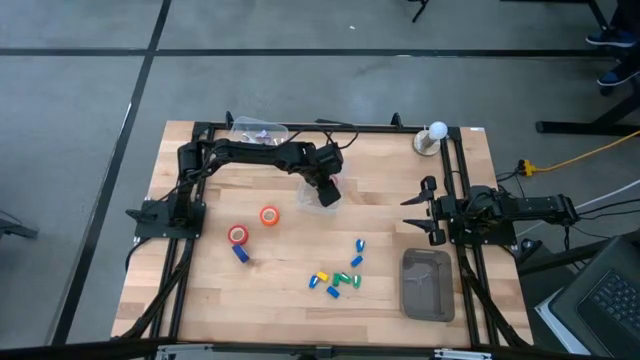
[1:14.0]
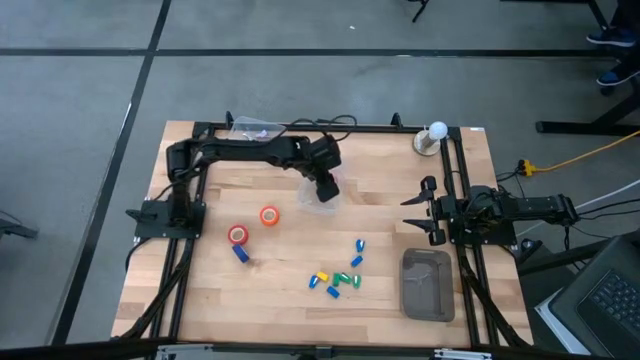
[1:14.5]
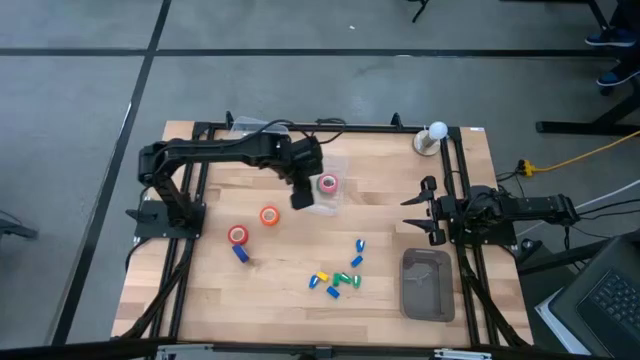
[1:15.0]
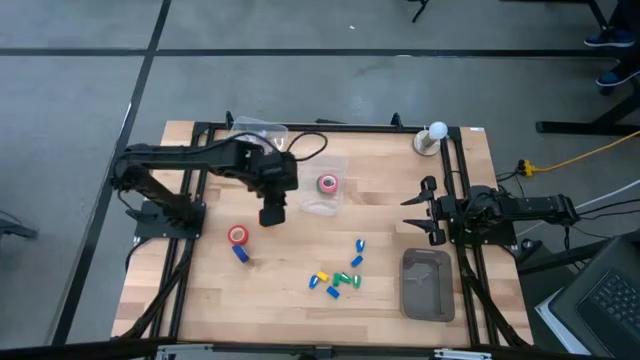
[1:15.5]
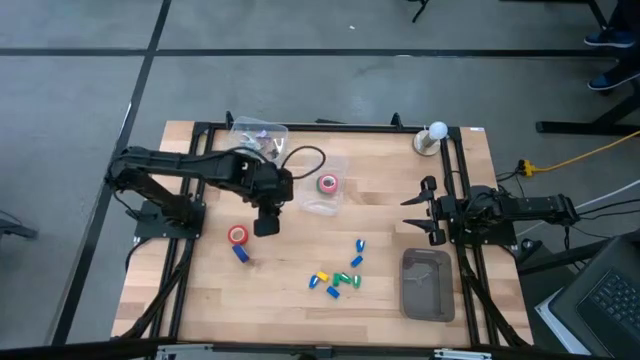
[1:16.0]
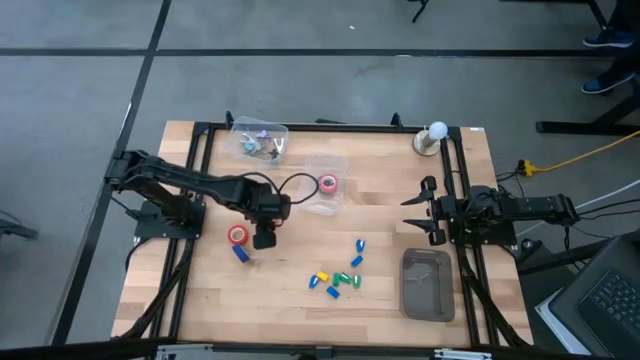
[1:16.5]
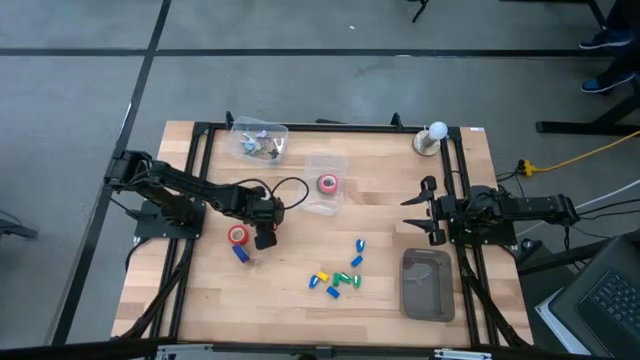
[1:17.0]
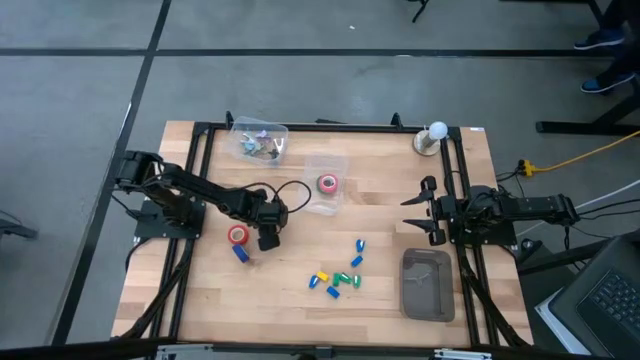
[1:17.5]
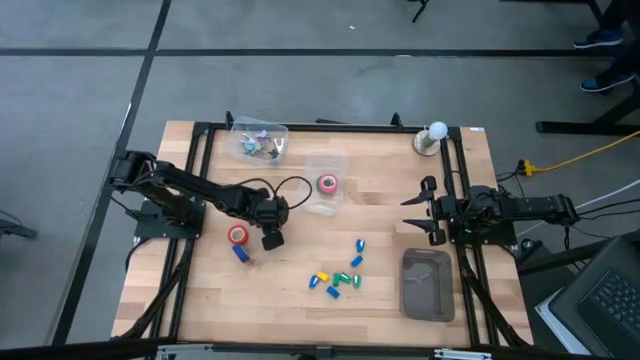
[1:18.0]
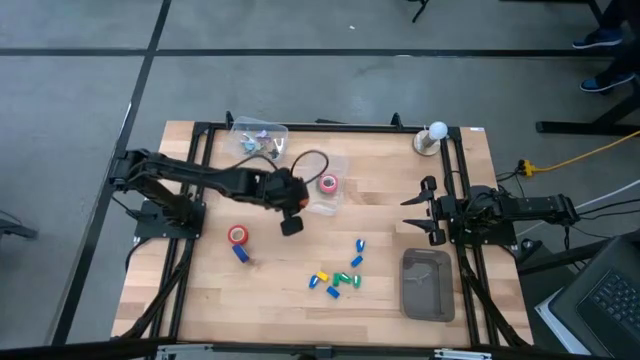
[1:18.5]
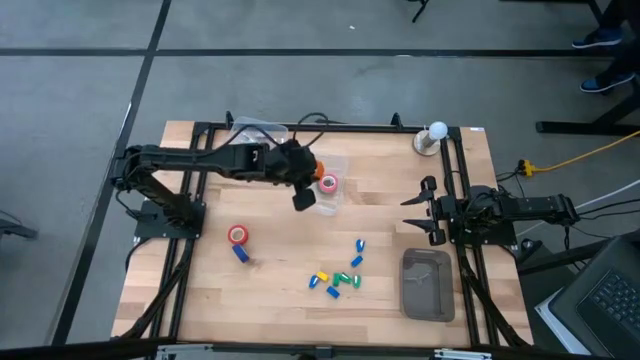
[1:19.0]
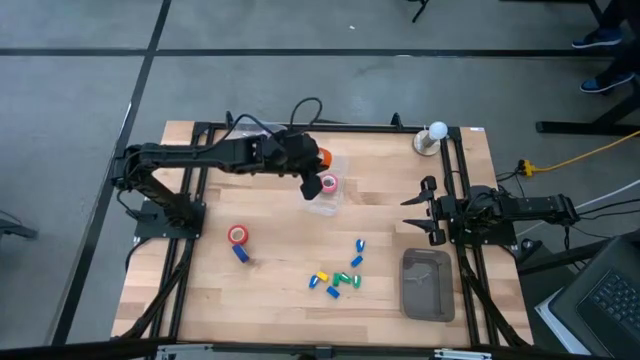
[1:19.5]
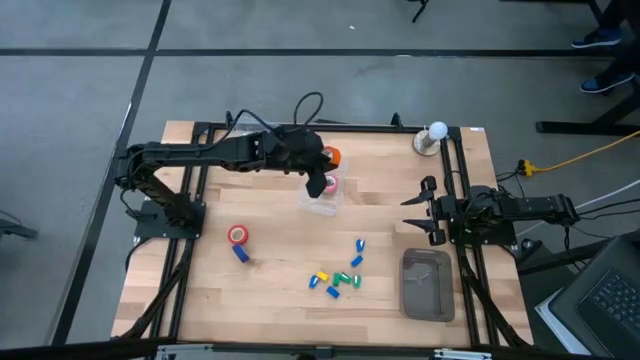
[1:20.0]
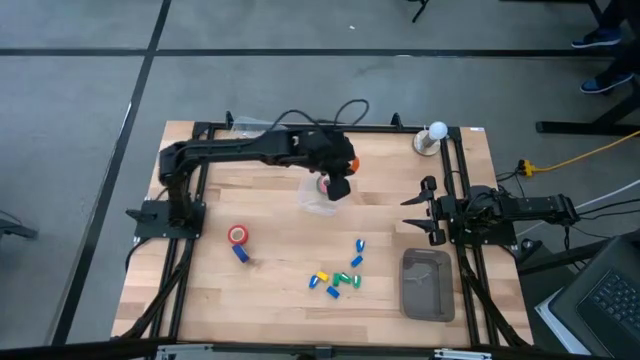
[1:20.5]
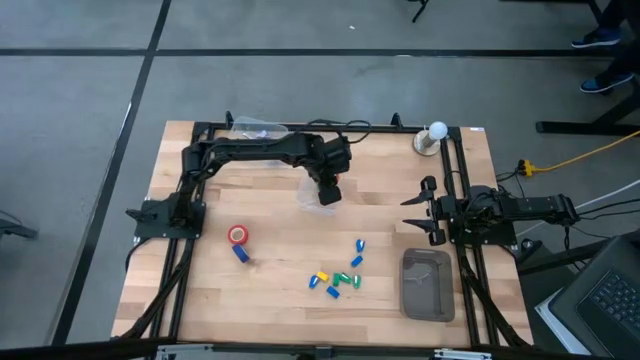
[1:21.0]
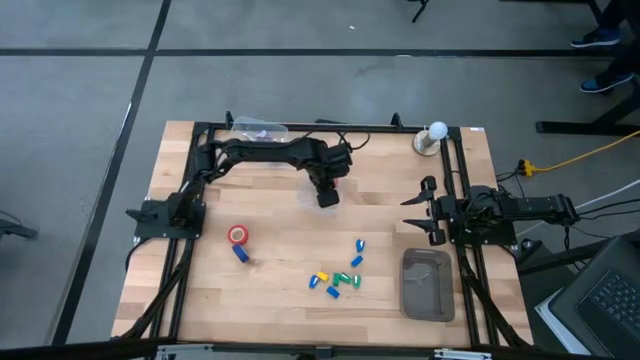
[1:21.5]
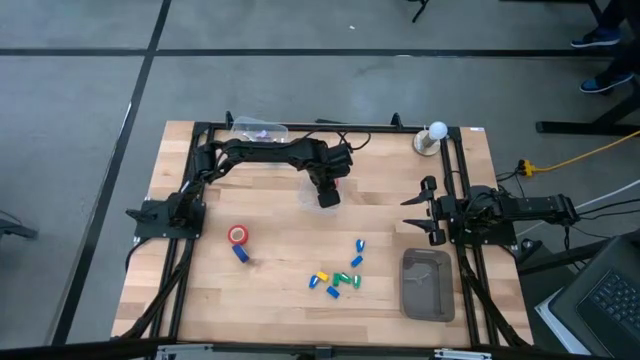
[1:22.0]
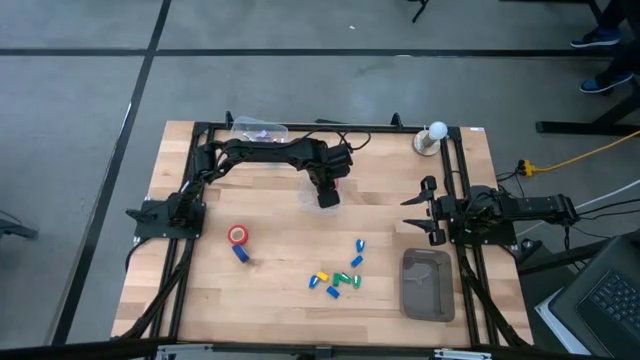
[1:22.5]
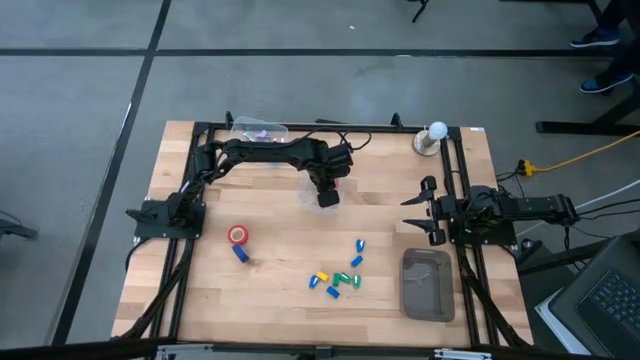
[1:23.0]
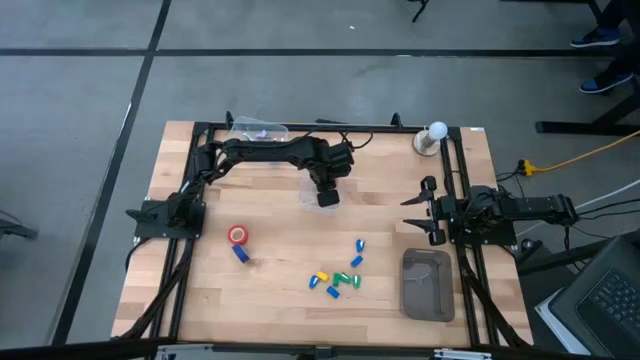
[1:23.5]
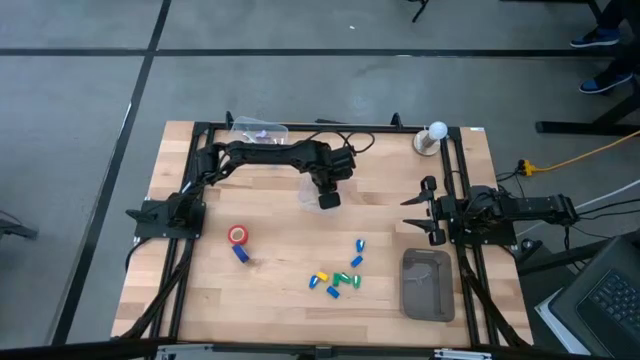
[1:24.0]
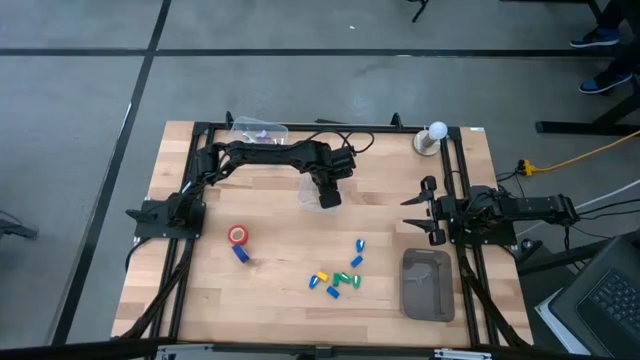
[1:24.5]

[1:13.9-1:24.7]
Task: Pick and place Stapler, Stapler remover, tape
Put the orange tape into the bottom transparent bin

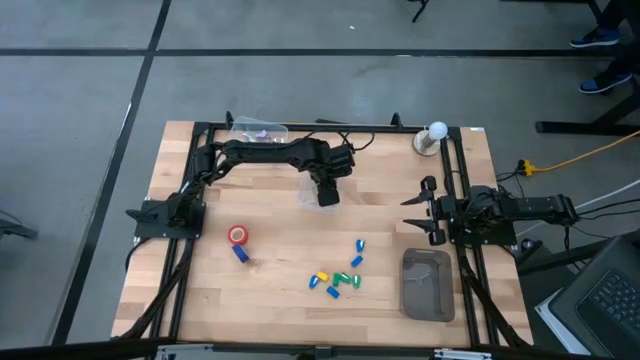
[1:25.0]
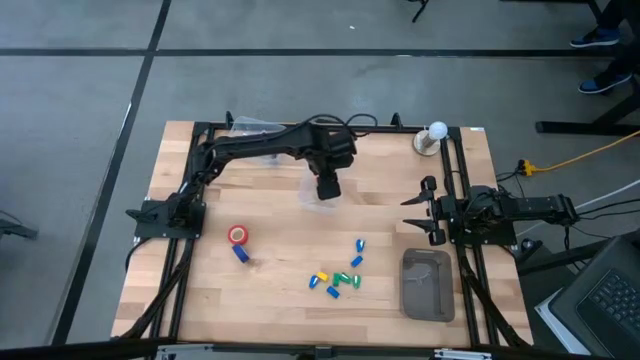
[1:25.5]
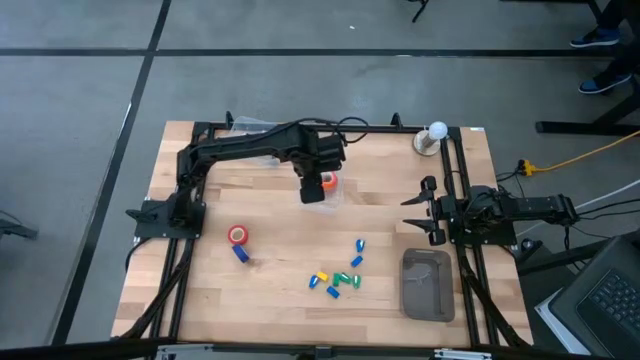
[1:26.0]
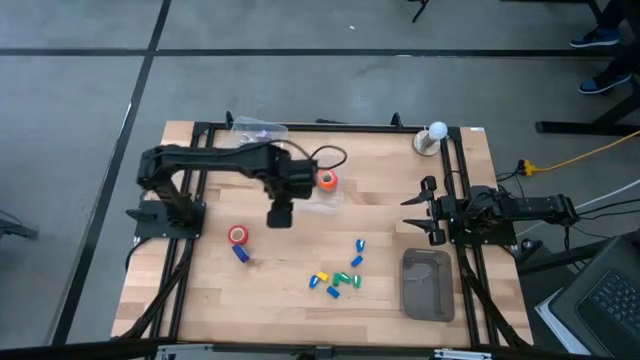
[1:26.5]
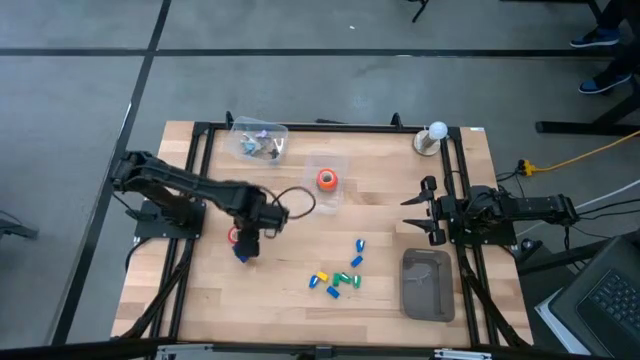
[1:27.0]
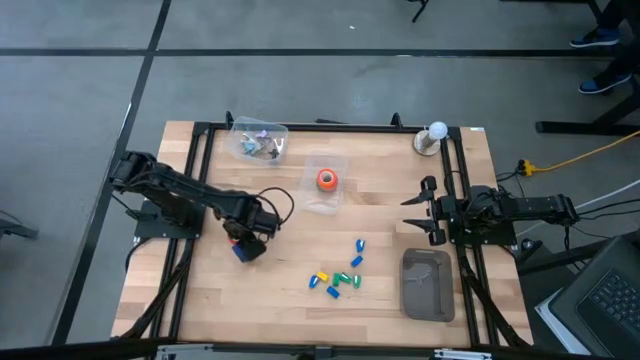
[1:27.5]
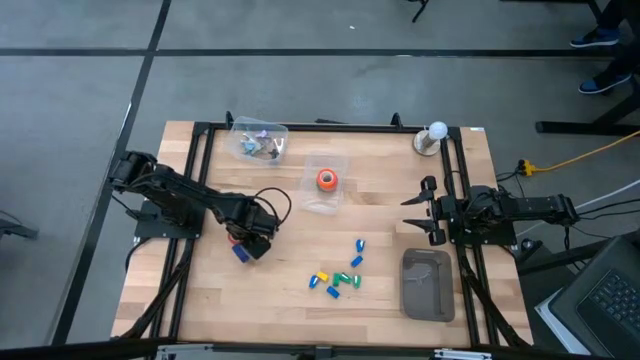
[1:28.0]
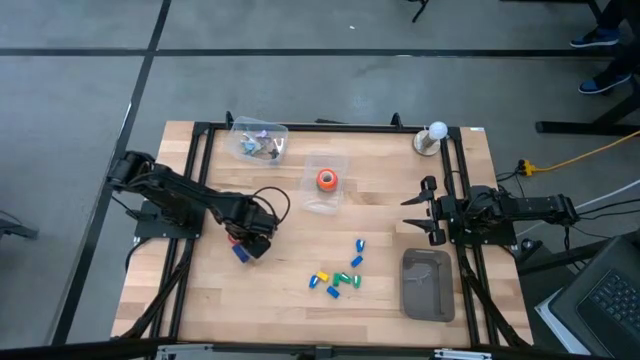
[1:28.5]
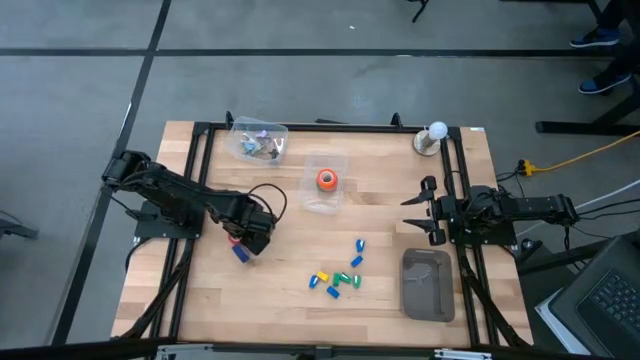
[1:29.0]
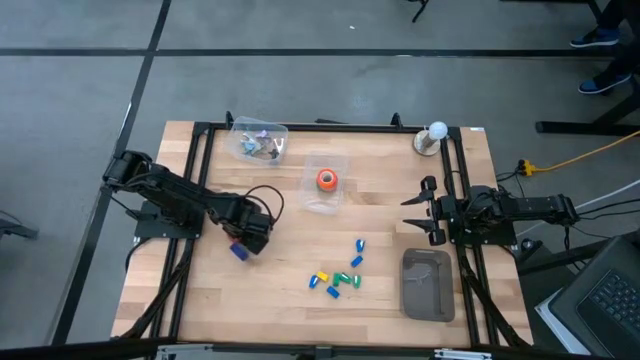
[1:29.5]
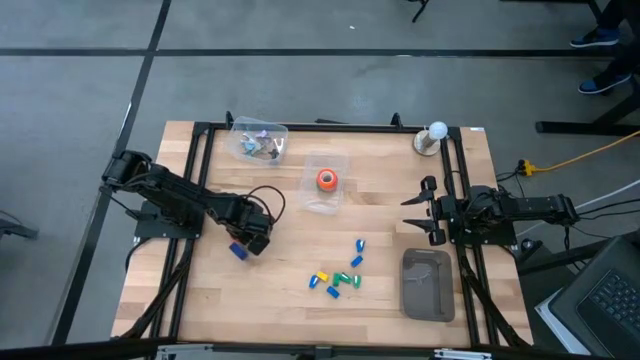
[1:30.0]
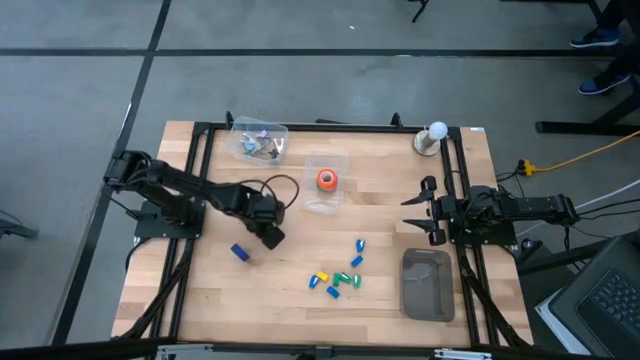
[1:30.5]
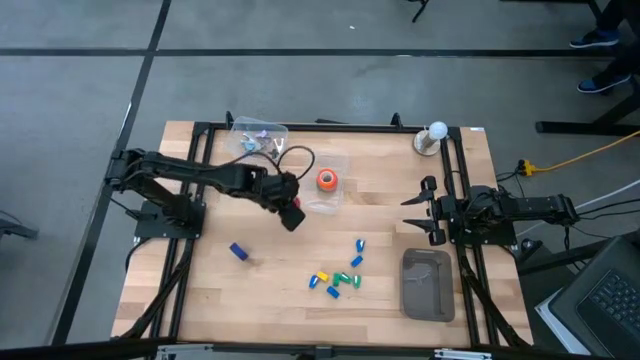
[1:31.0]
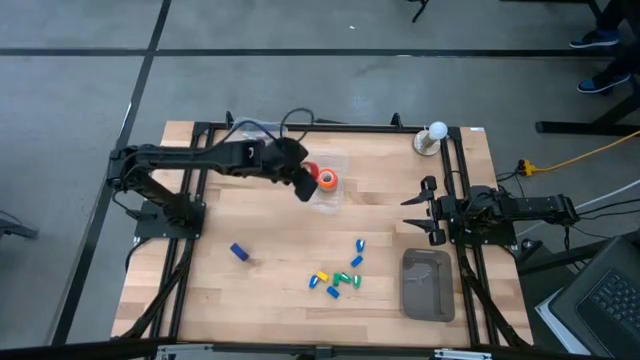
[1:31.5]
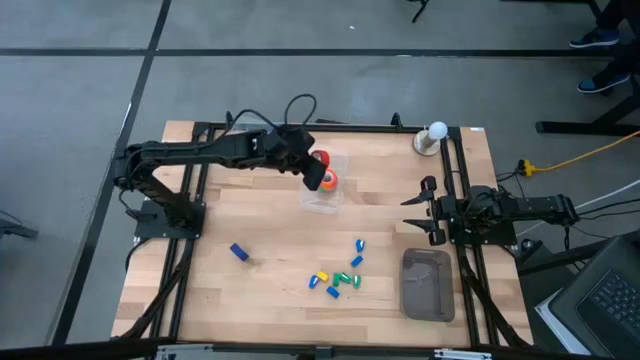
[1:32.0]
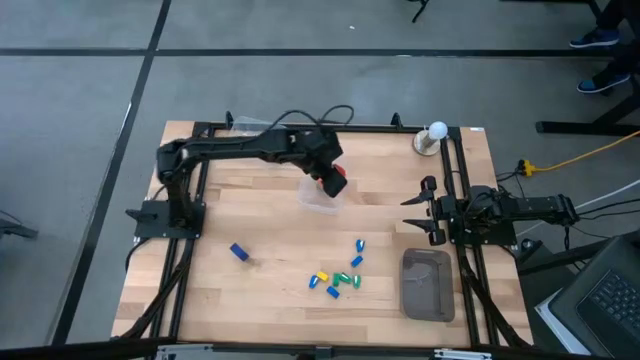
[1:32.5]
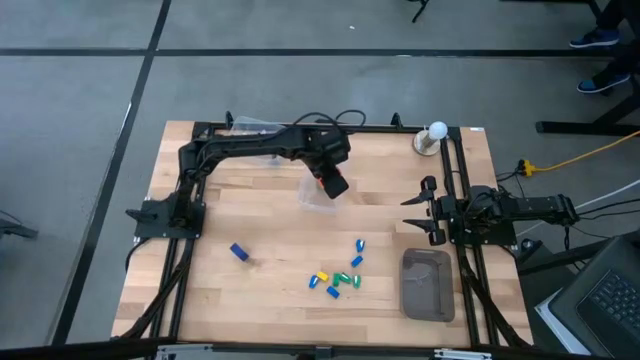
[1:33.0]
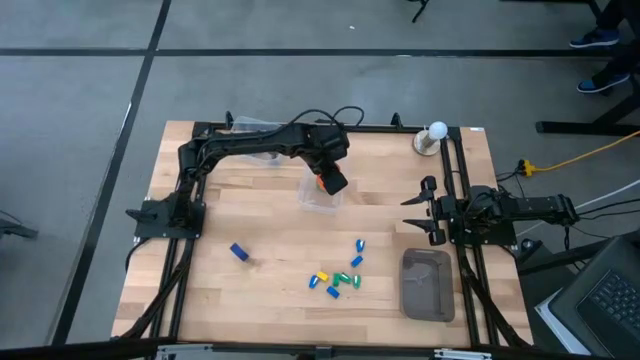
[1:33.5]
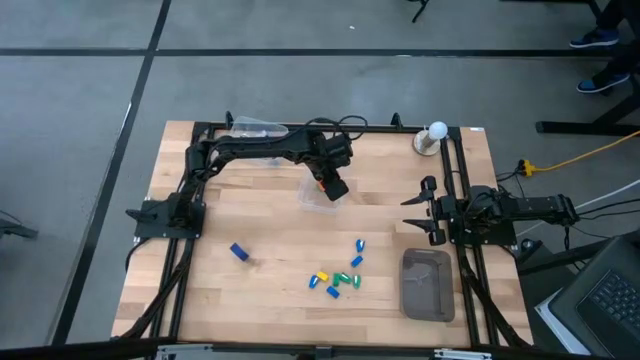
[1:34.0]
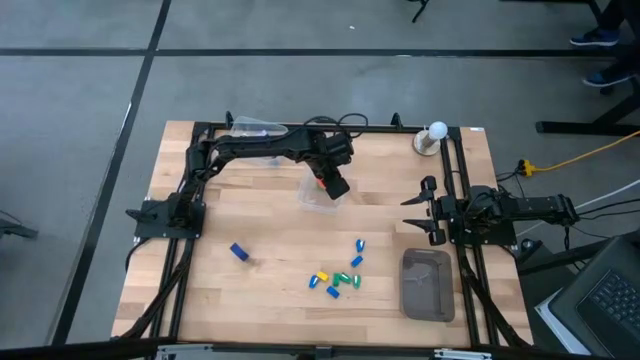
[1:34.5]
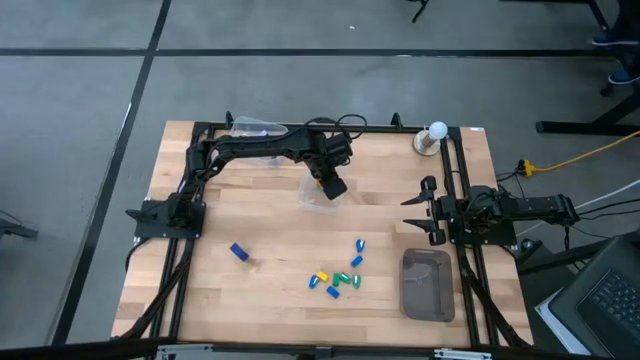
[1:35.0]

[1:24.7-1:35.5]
Put the red tape into the bottom of the transparent bin
